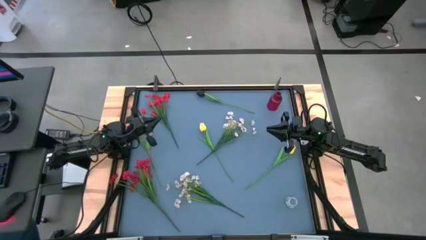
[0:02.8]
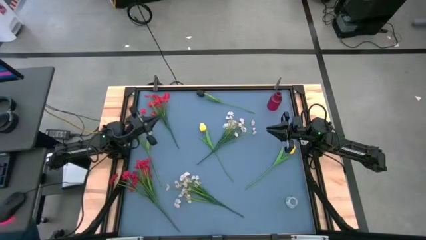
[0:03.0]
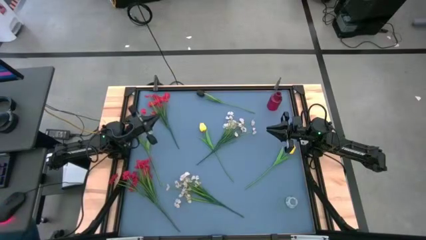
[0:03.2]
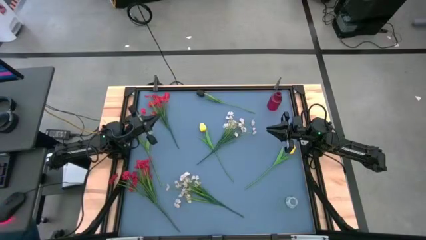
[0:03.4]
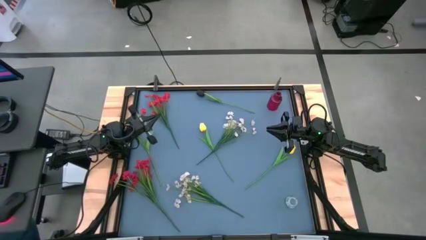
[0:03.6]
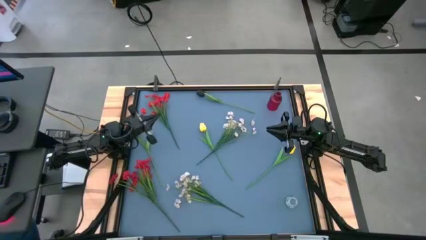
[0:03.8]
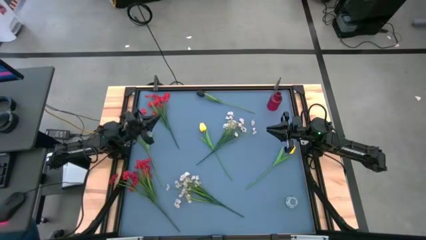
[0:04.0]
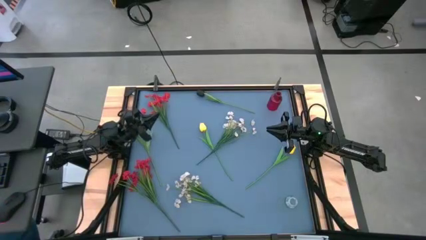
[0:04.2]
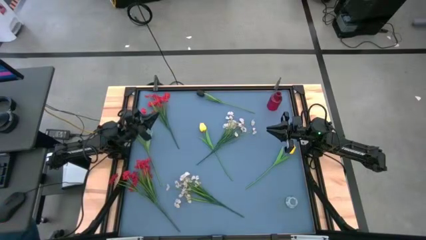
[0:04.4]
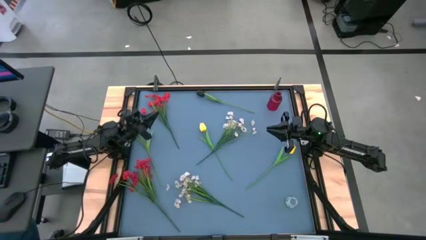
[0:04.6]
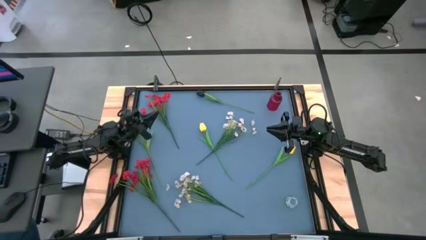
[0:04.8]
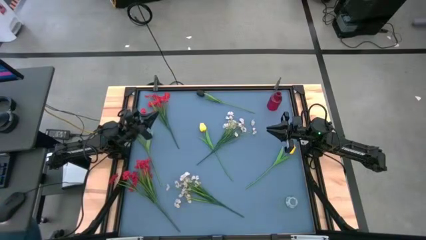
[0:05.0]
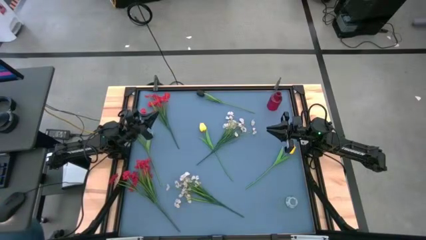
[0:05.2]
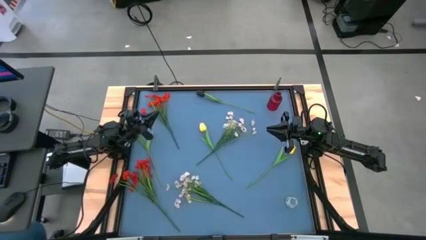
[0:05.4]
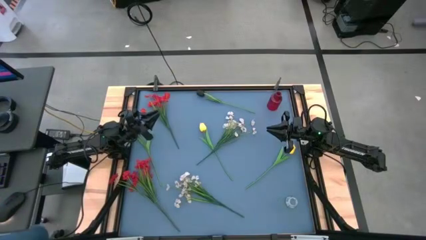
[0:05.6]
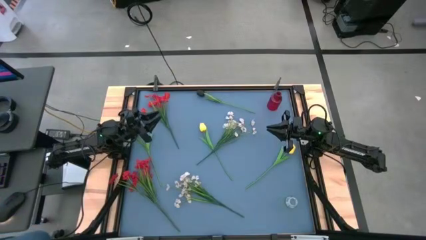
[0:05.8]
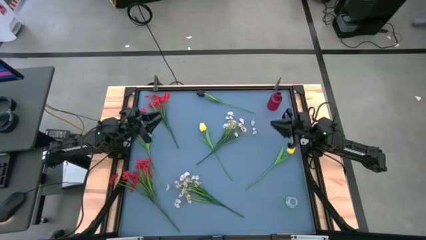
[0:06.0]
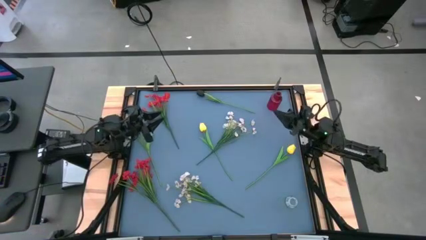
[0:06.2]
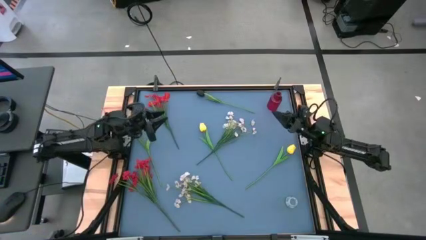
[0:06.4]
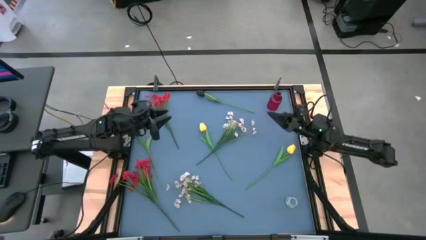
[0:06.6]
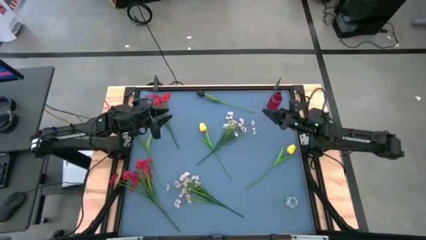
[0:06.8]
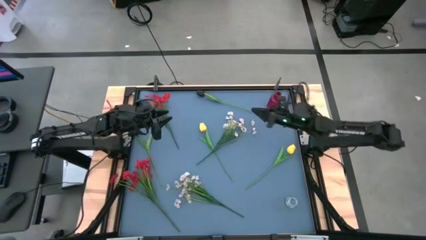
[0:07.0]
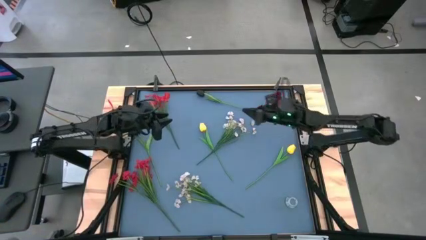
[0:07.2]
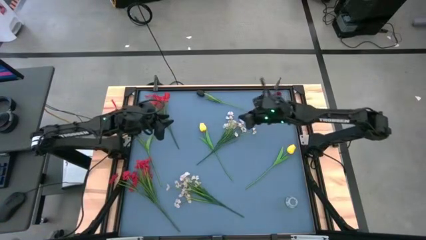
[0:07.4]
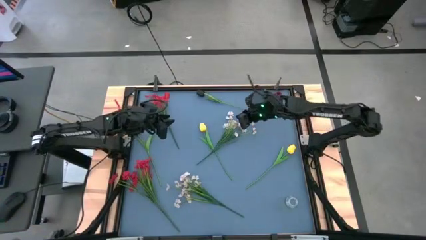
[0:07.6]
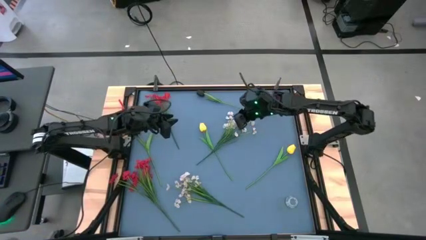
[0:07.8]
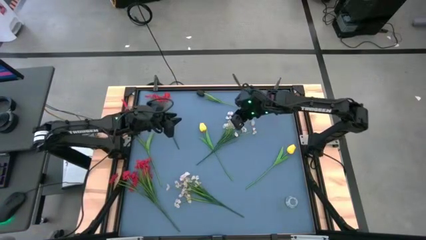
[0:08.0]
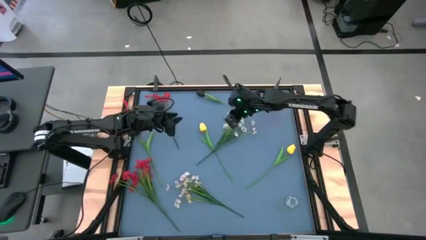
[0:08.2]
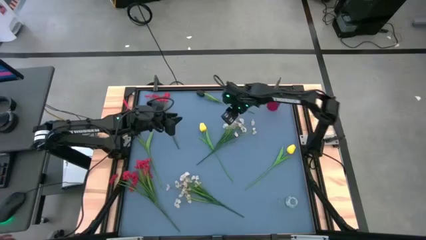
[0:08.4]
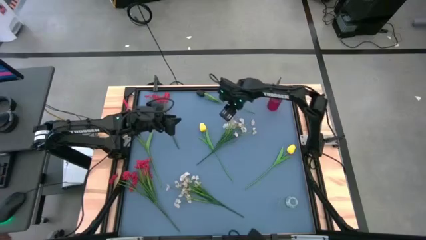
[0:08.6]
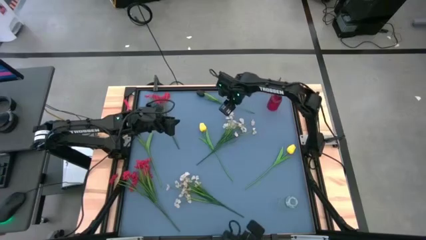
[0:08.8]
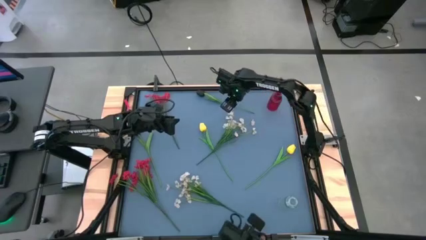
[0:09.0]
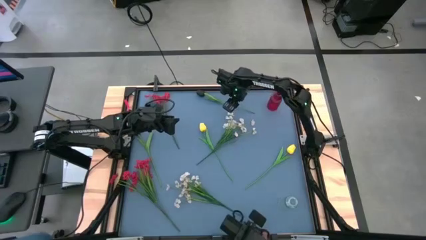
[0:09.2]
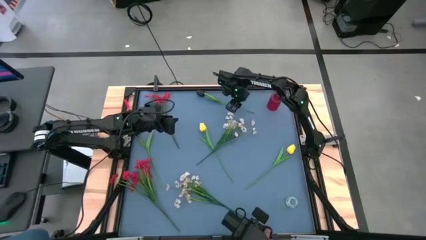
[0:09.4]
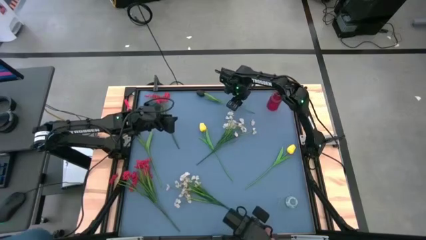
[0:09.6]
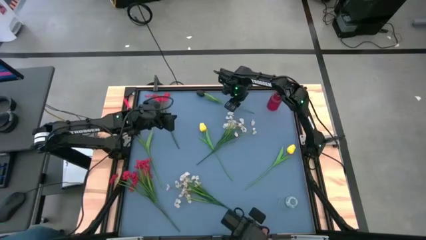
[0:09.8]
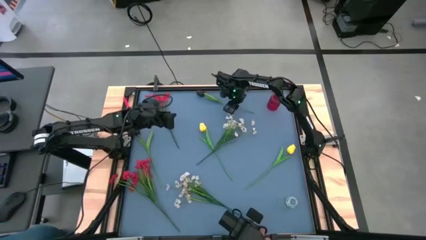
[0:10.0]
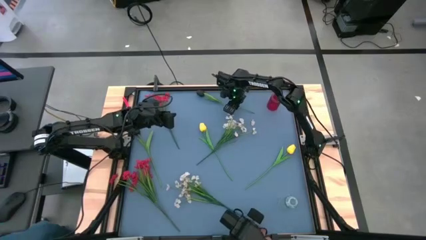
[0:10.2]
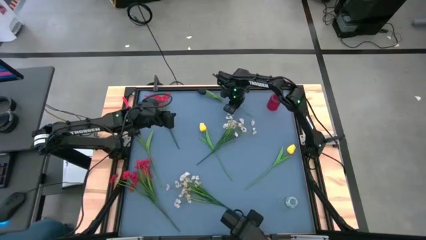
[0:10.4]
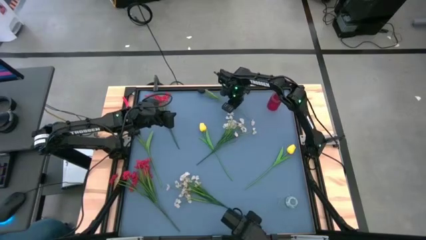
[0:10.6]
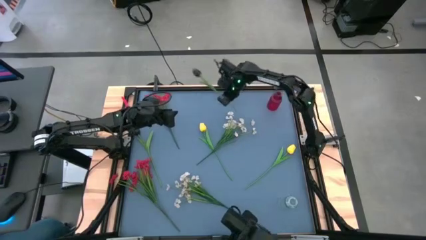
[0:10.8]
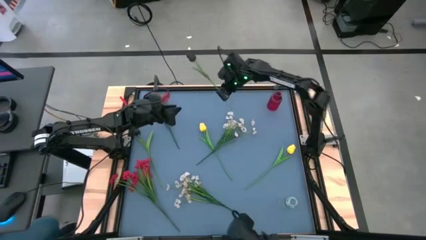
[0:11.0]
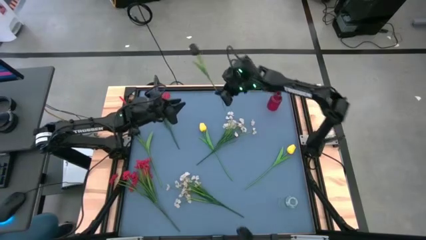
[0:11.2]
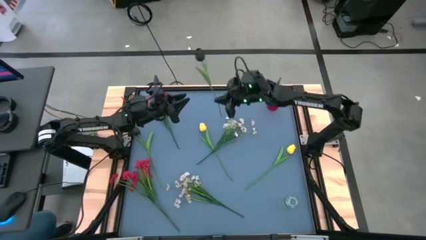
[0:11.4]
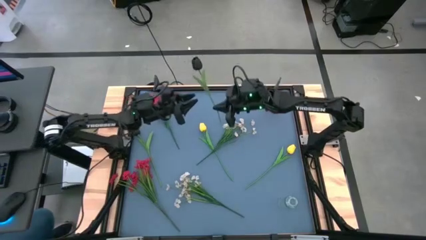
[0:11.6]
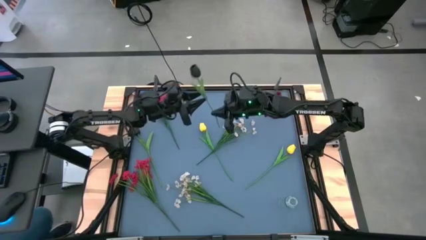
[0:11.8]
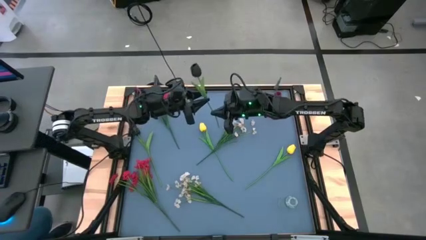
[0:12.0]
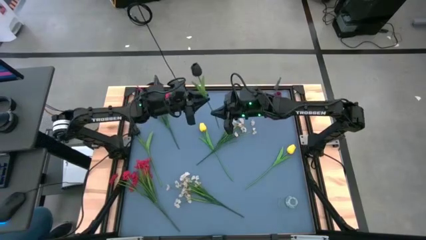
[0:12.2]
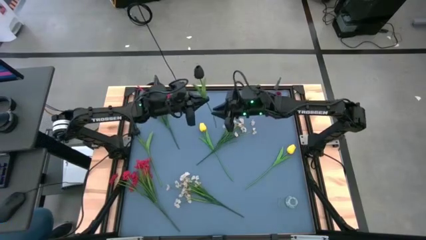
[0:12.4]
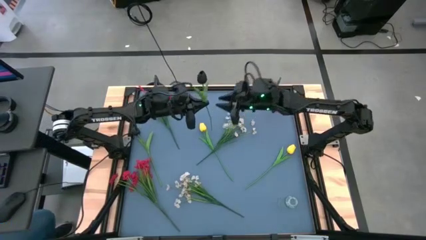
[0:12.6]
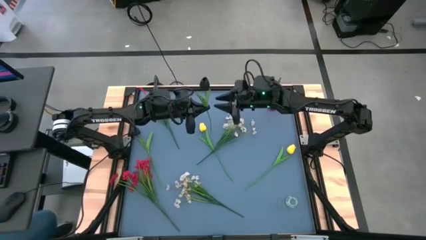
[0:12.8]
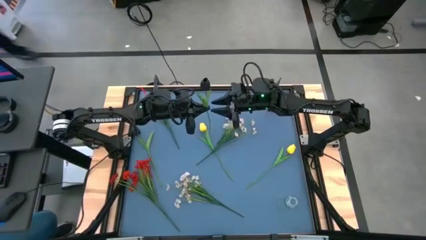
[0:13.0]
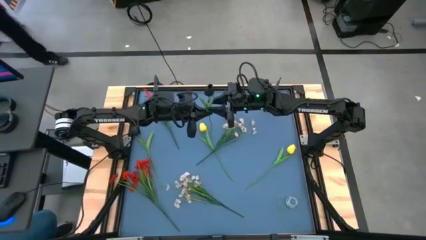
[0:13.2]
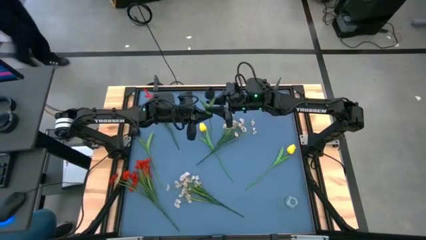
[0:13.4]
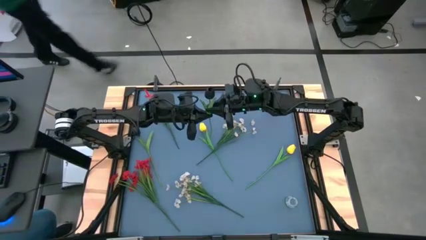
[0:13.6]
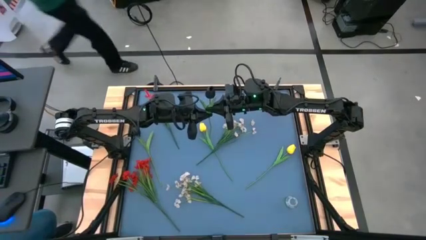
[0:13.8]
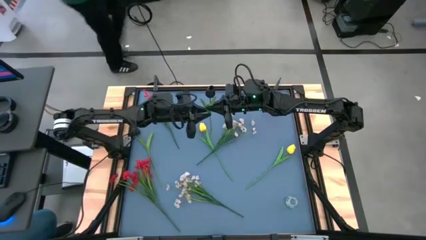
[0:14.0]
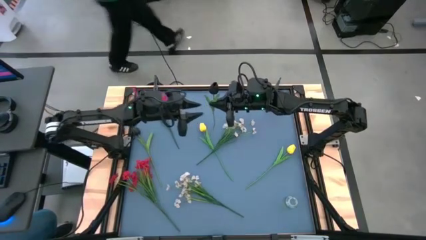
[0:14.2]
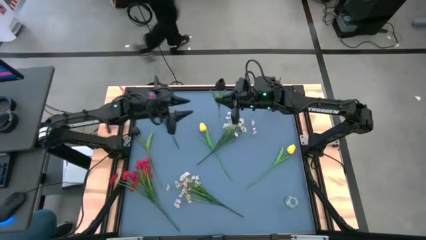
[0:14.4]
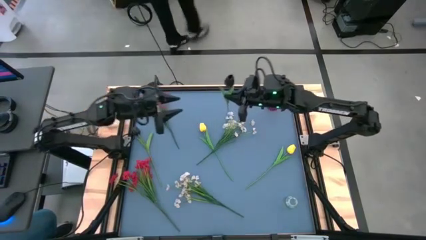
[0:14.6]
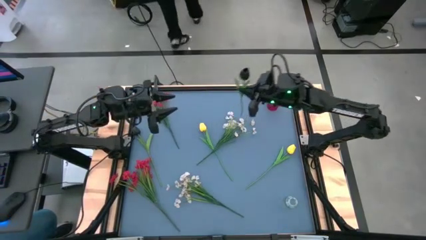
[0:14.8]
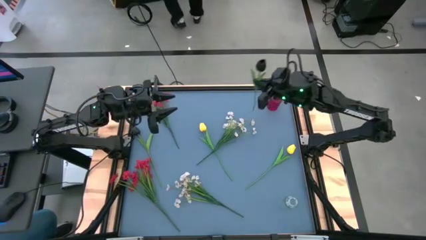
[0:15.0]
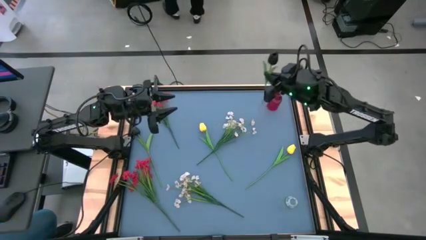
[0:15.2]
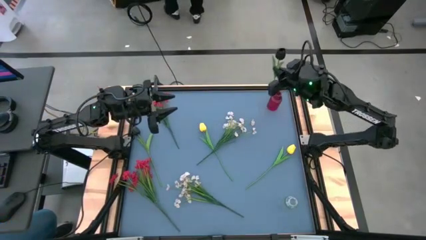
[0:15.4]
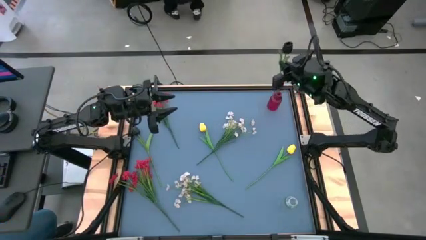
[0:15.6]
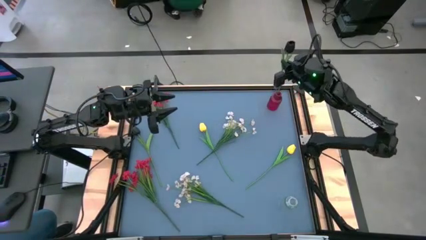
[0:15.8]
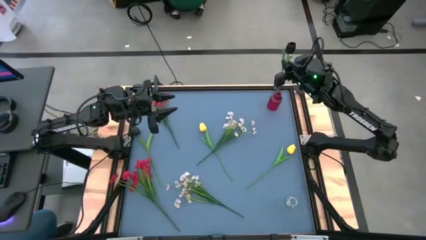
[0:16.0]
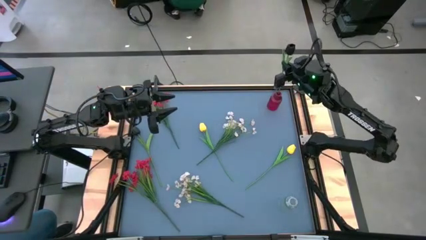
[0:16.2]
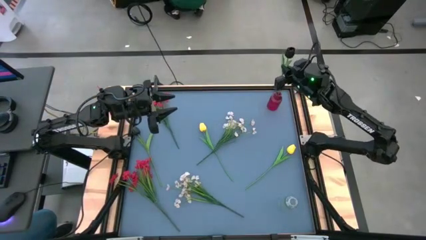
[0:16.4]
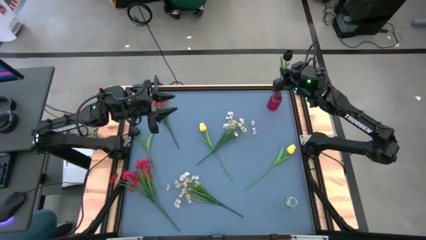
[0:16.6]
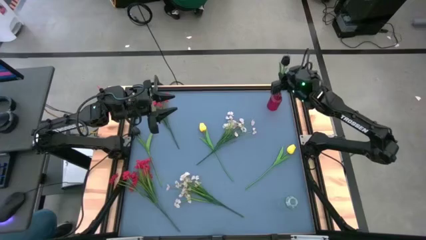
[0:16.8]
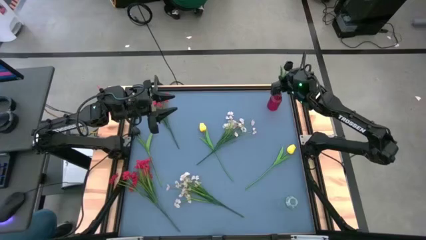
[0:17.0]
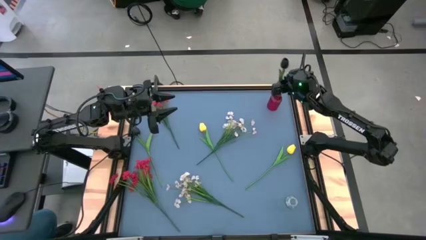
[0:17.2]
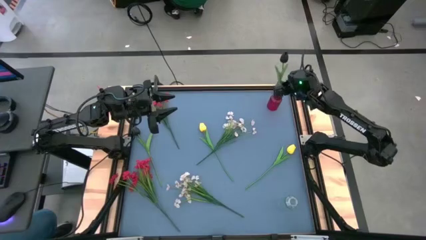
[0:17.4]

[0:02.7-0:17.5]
Task: Sort flowers into vase by color
Put the right black tulip into the red glass vase
